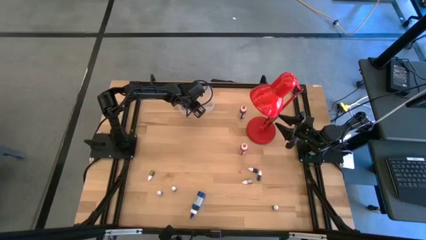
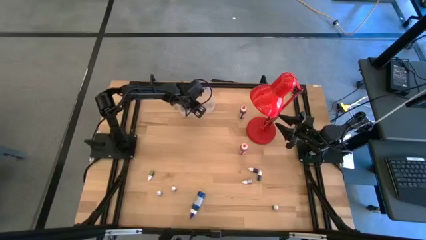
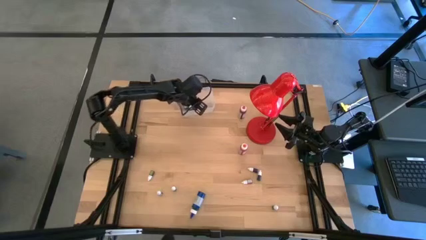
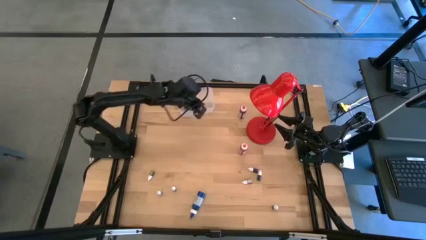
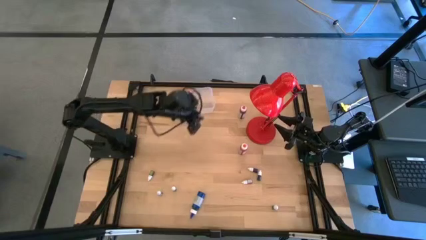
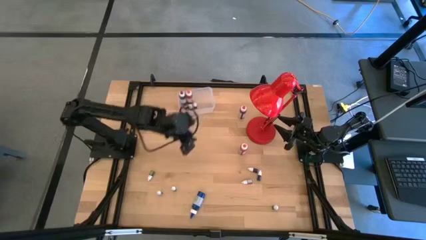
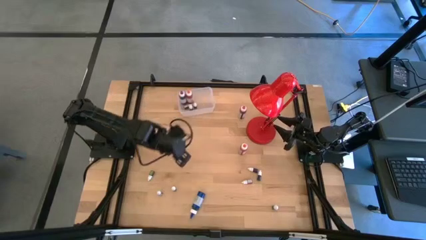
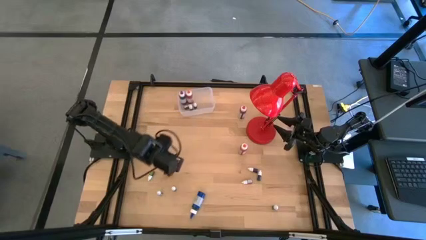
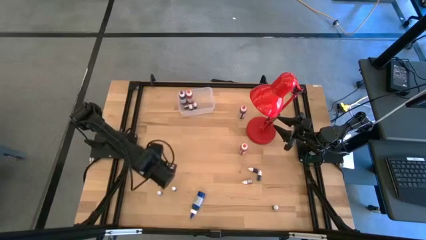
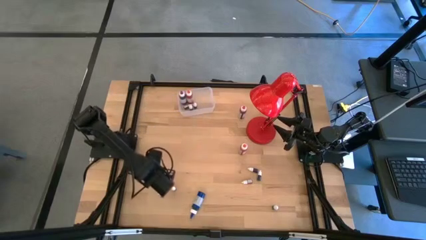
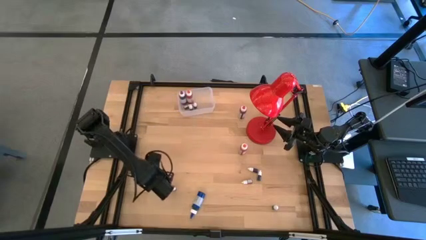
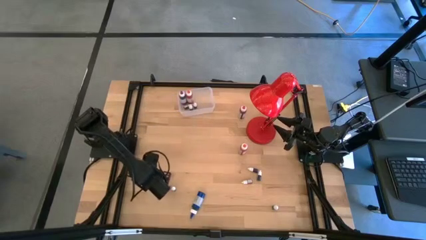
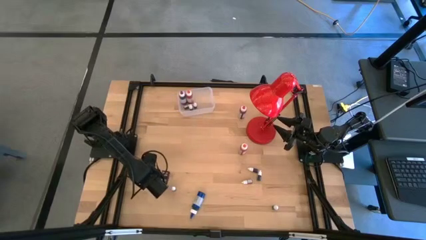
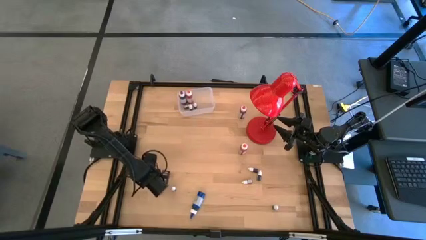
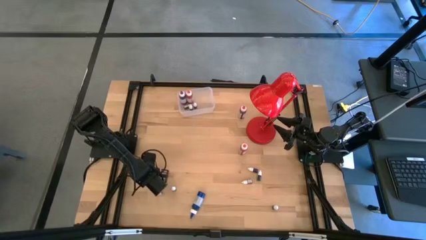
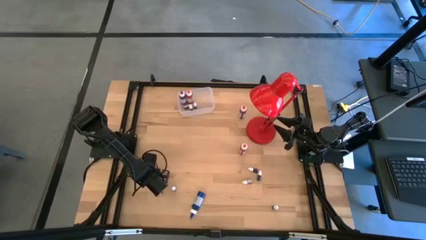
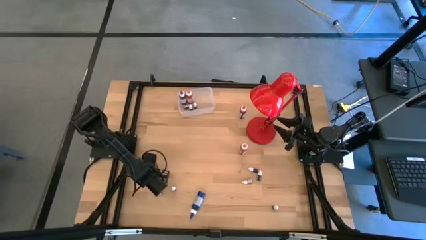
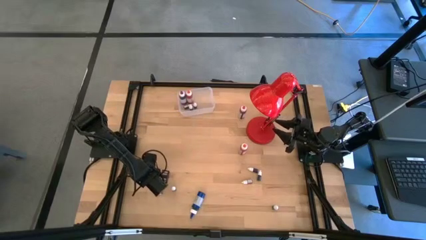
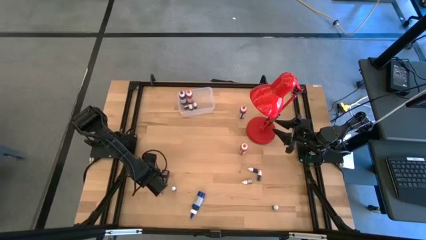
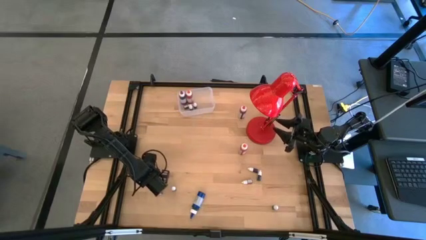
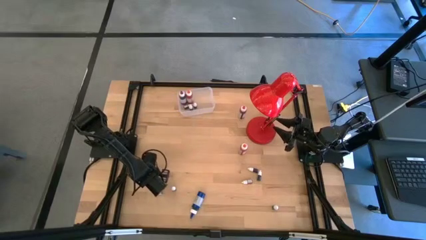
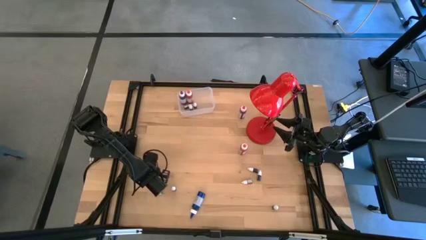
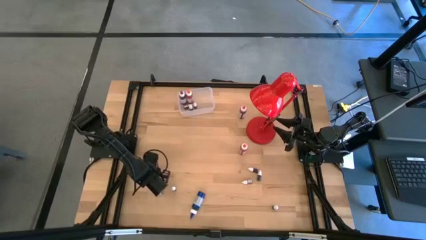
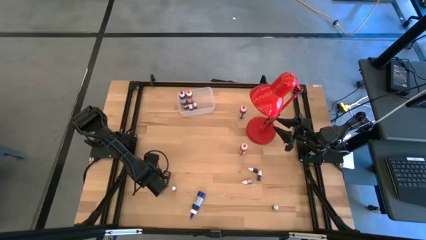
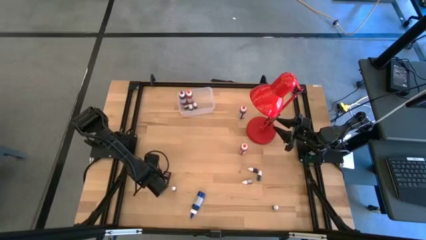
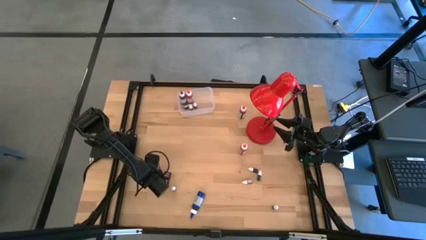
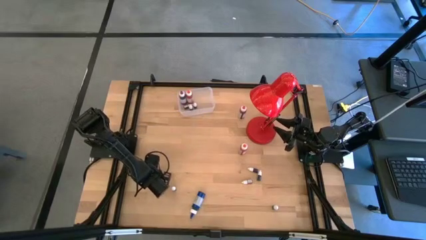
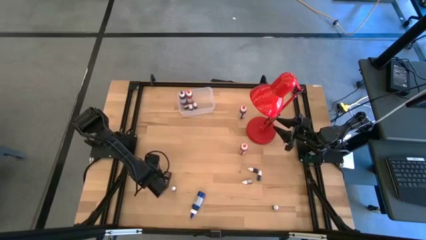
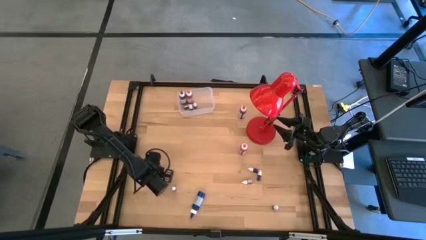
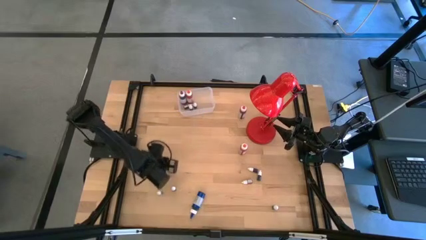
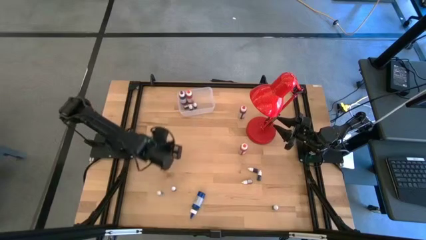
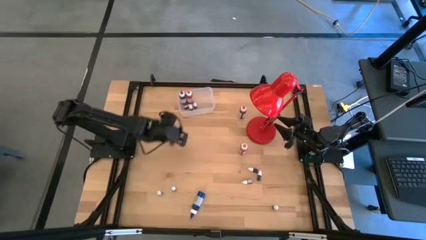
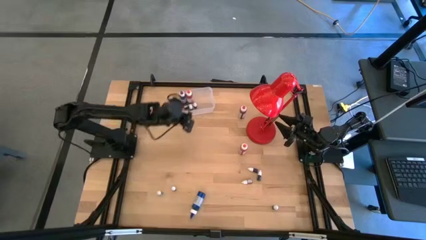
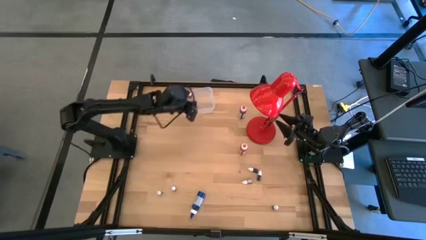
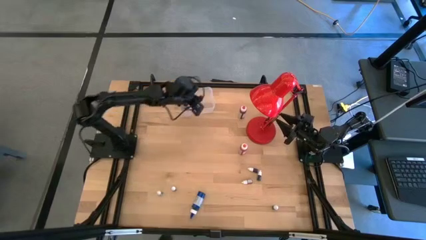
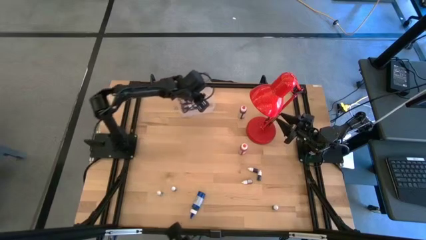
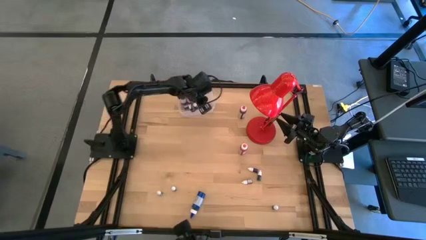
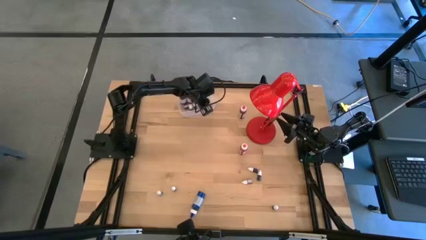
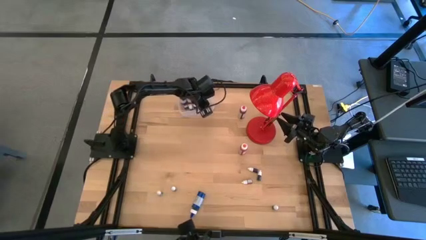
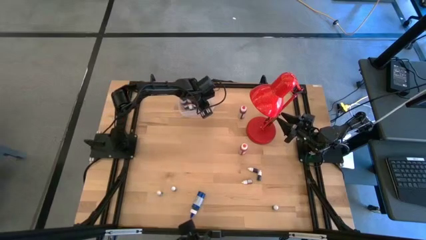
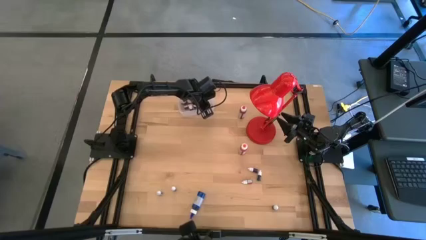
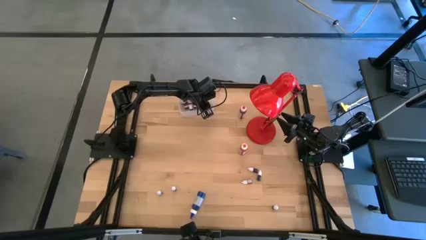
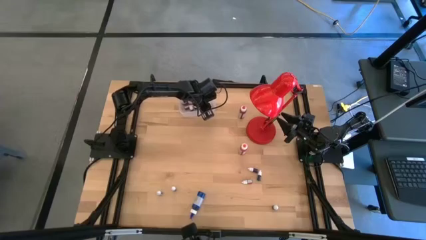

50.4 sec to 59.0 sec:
Task: Pick & Place food coloring
Put the small green food coloring bottle into the transparent bin

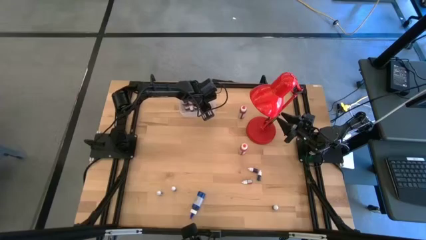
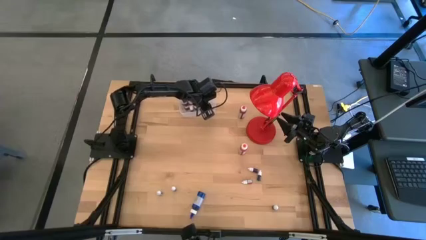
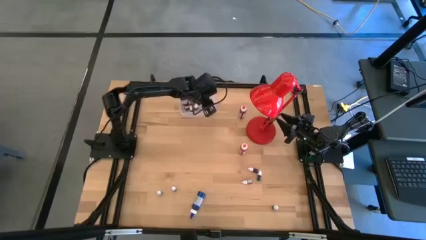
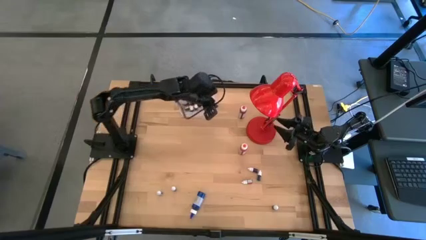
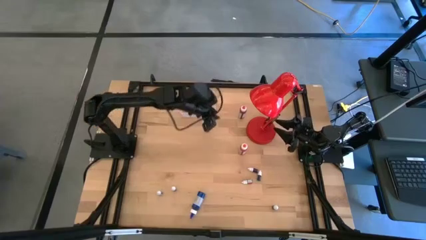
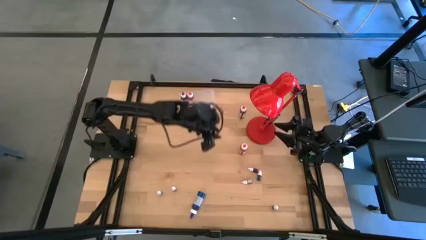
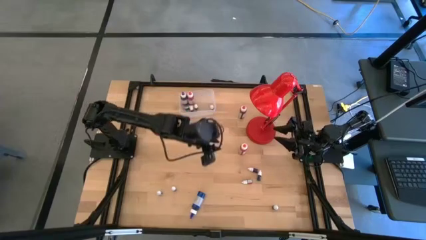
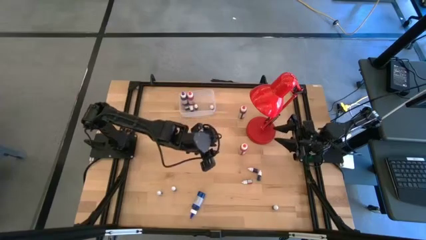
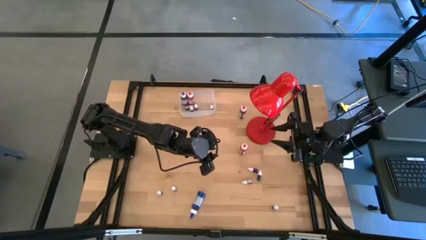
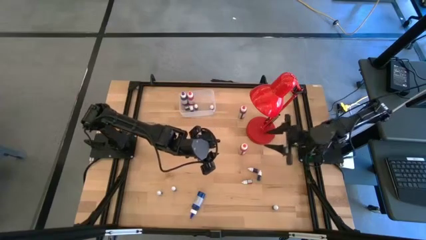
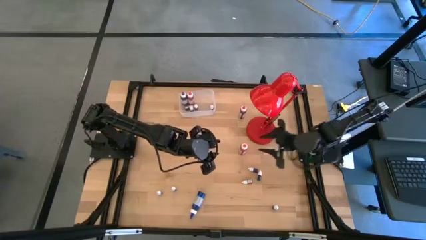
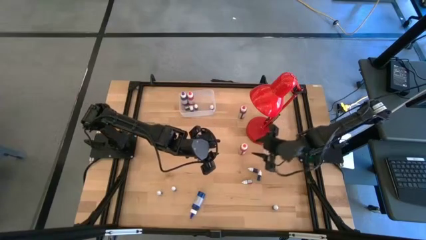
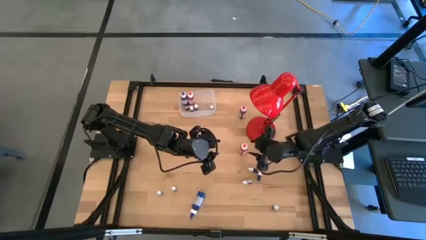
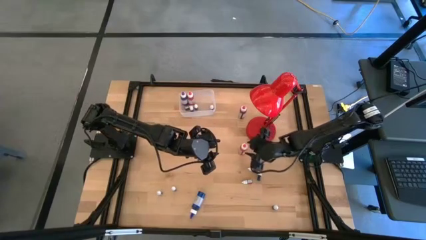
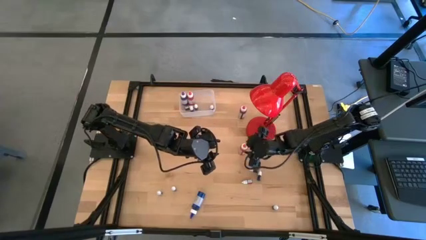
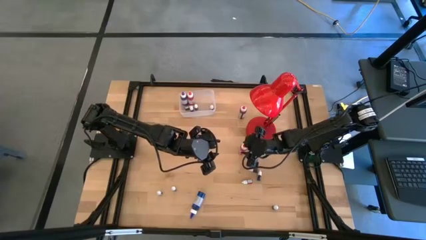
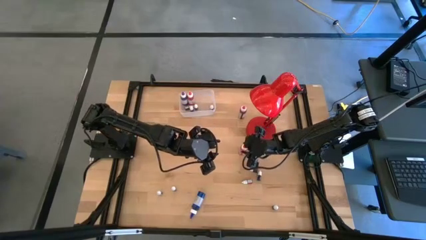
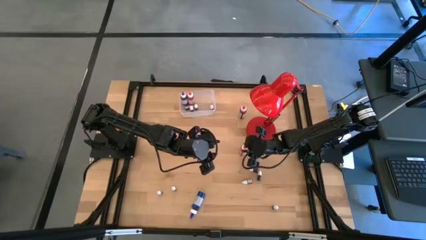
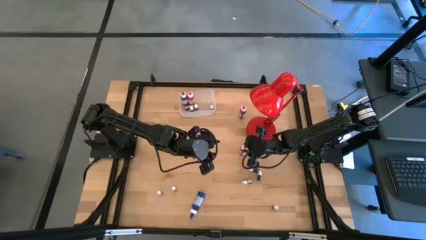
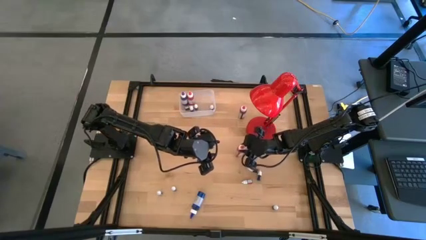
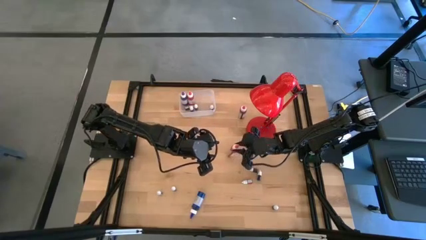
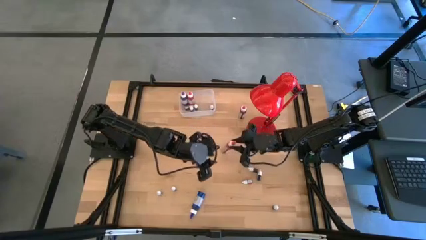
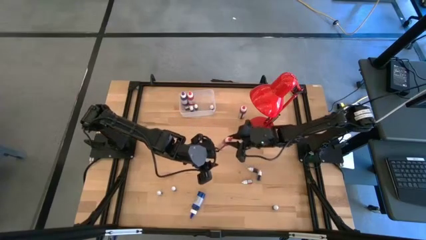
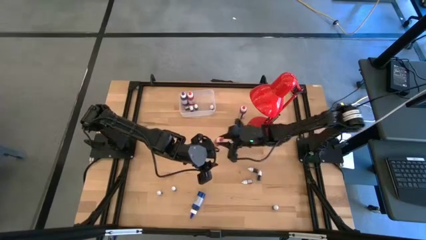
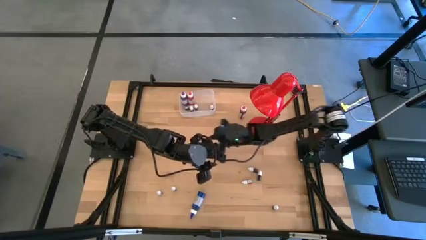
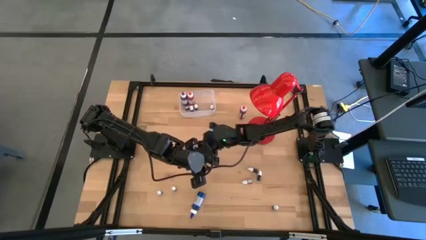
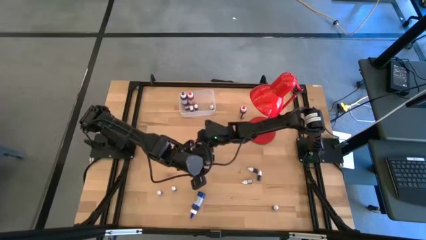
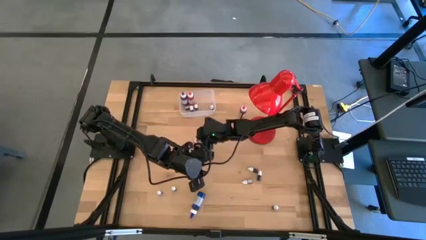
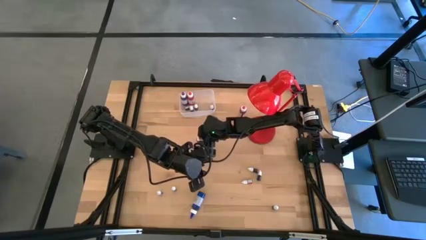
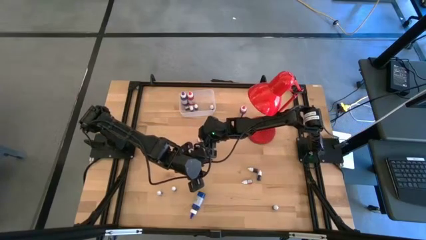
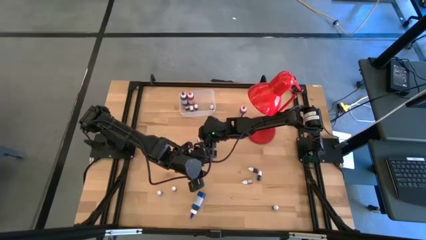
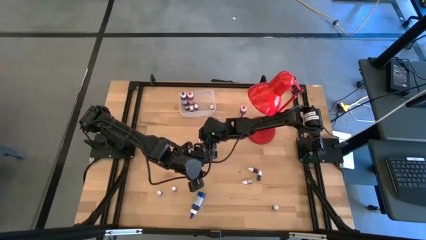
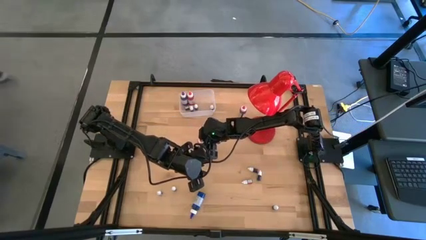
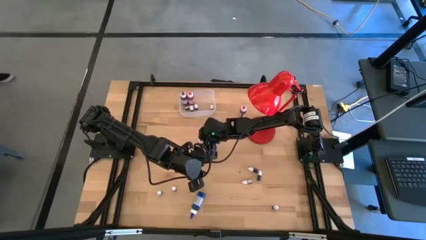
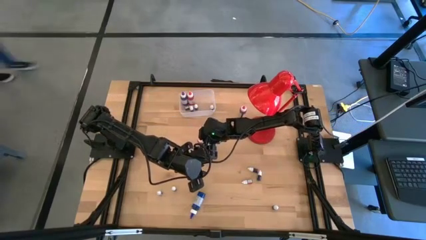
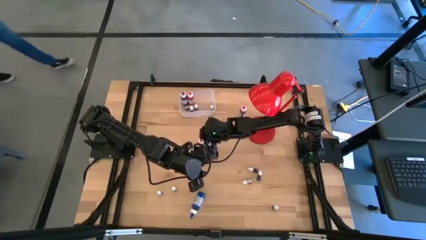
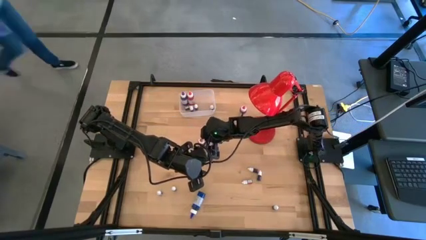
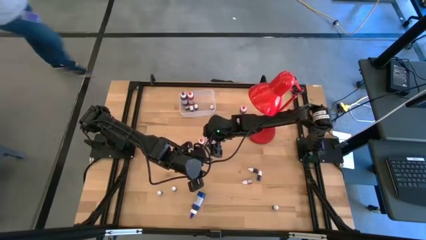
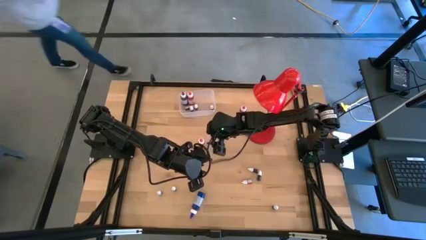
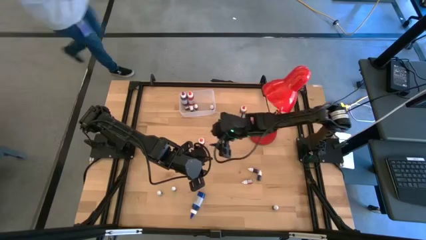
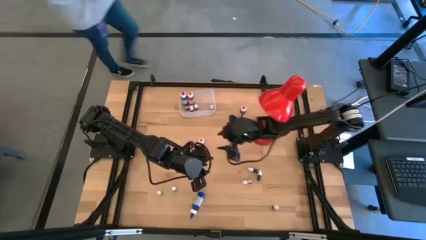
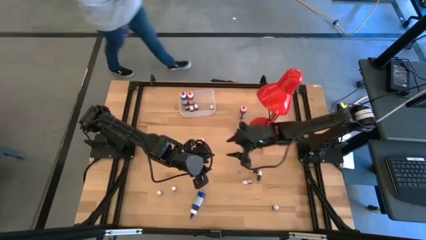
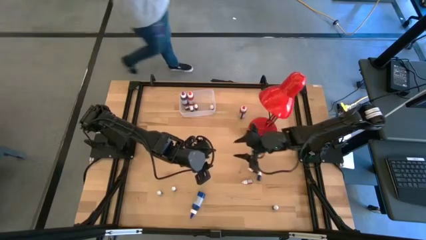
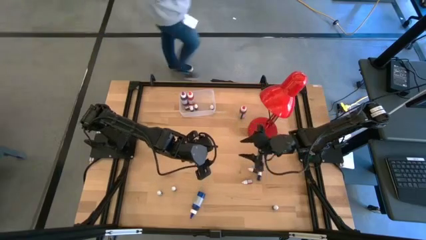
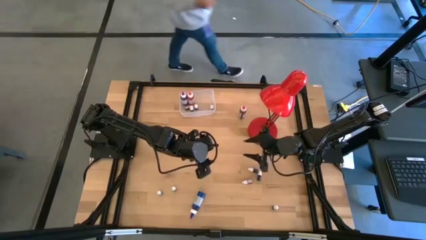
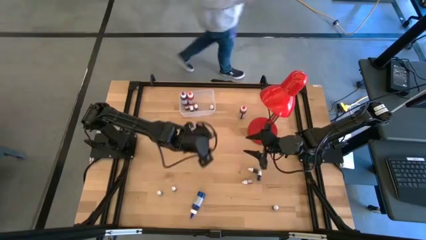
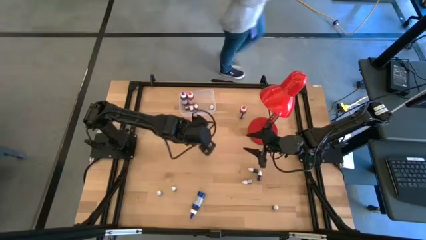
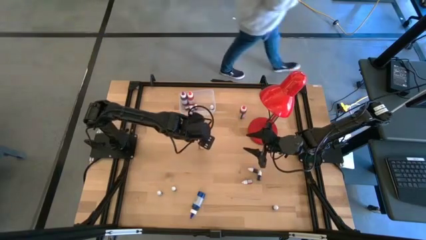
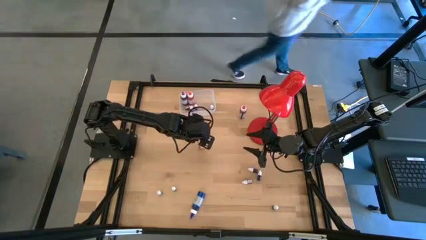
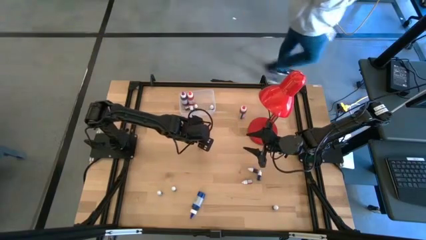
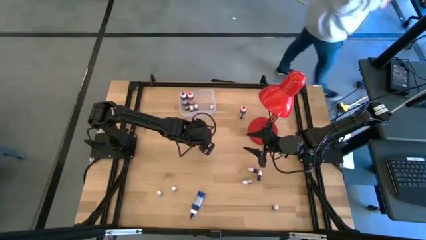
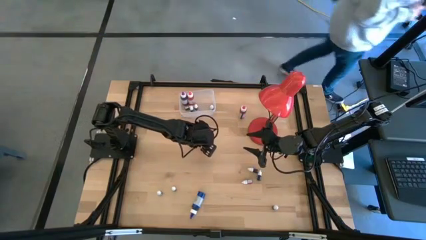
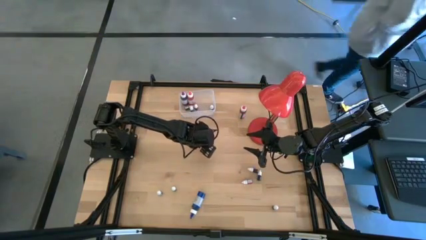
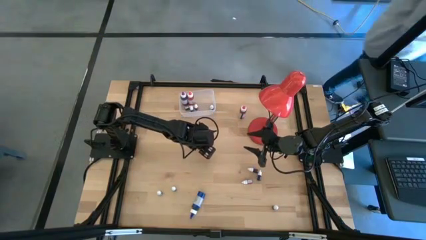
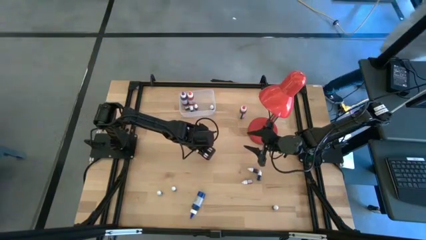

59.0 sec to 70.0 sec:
Put the large orange food coloring bottle into the transparent bin
